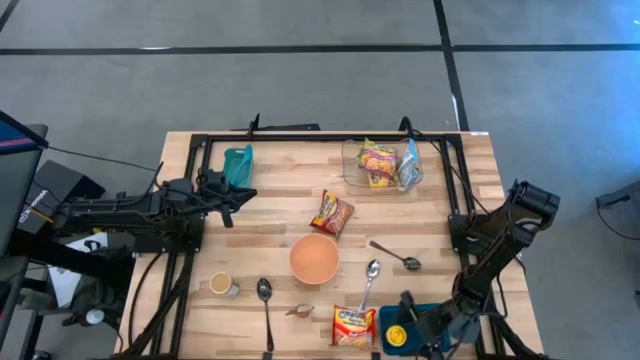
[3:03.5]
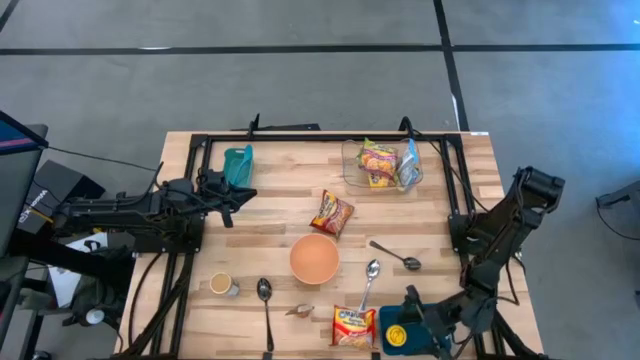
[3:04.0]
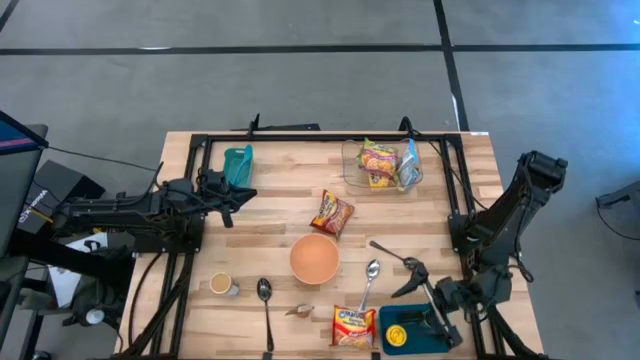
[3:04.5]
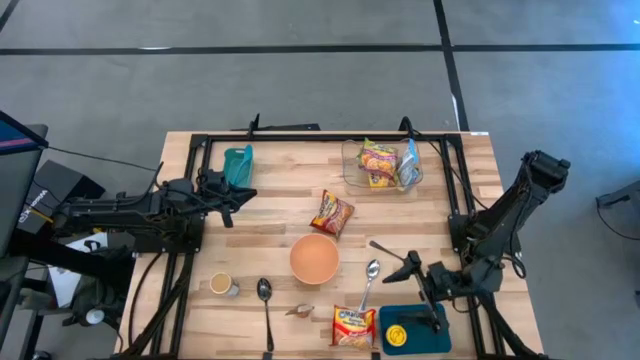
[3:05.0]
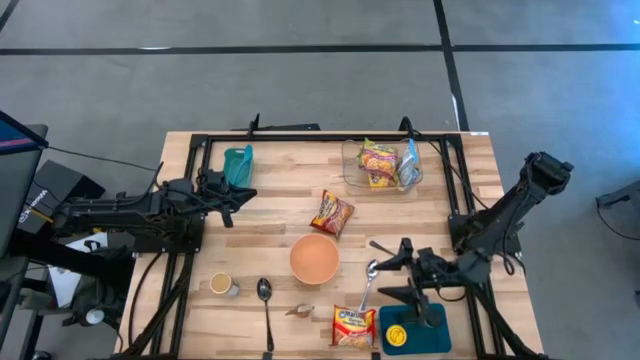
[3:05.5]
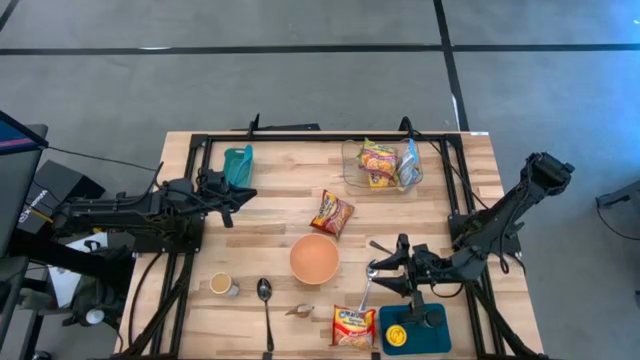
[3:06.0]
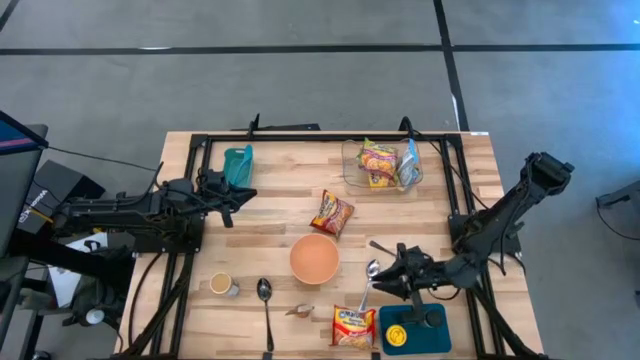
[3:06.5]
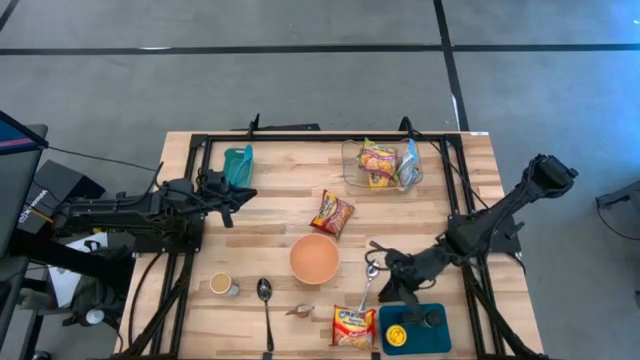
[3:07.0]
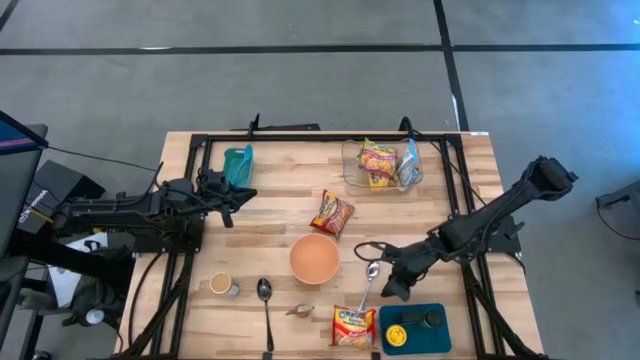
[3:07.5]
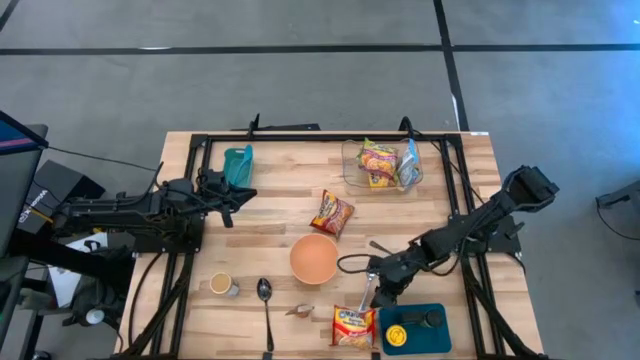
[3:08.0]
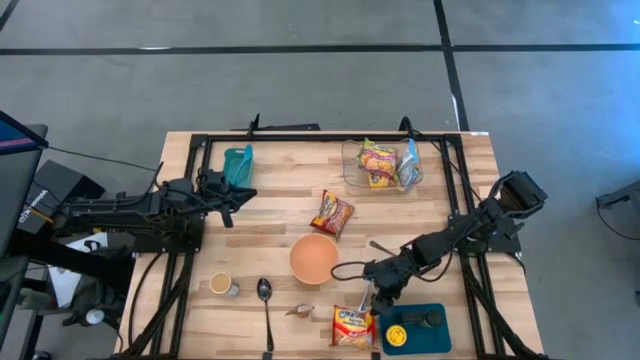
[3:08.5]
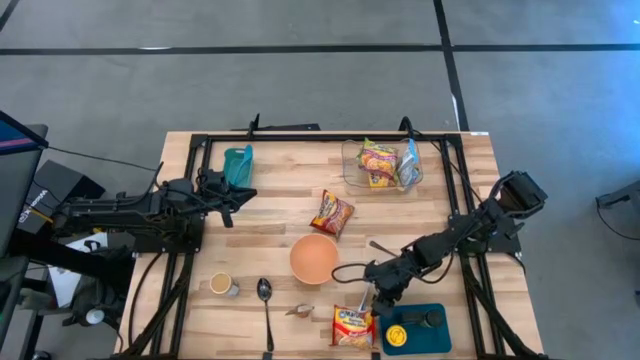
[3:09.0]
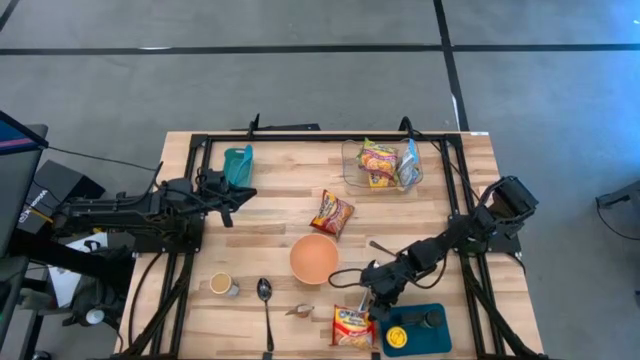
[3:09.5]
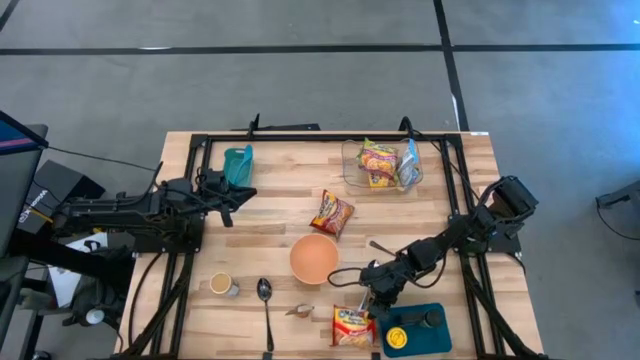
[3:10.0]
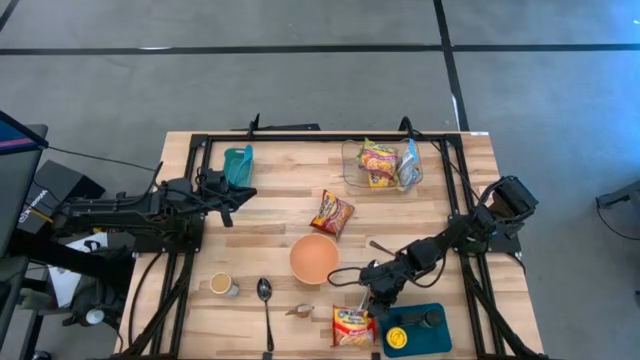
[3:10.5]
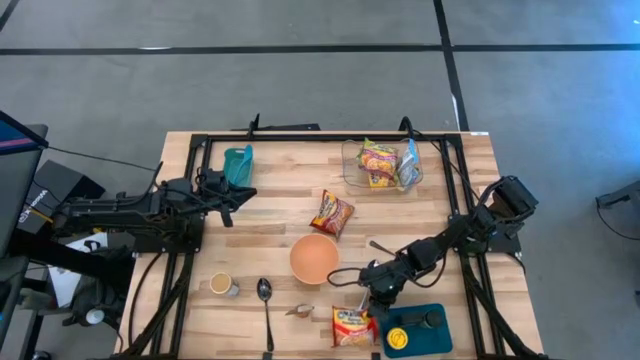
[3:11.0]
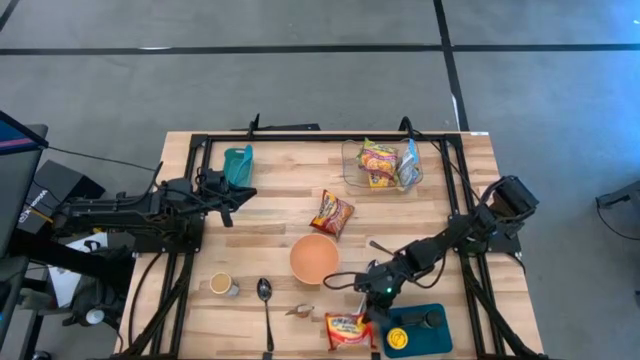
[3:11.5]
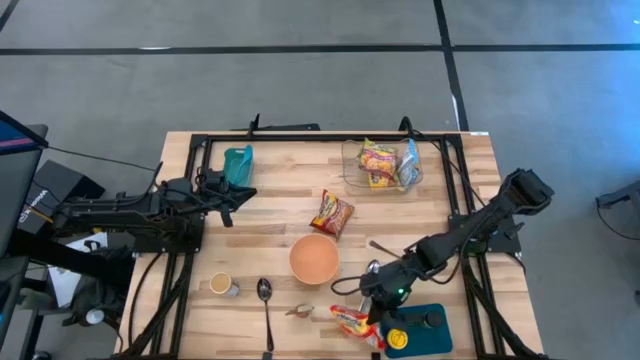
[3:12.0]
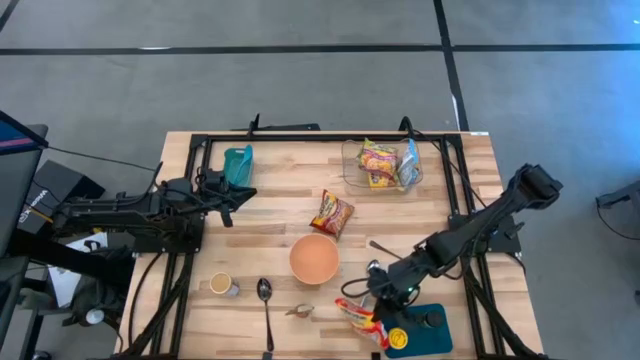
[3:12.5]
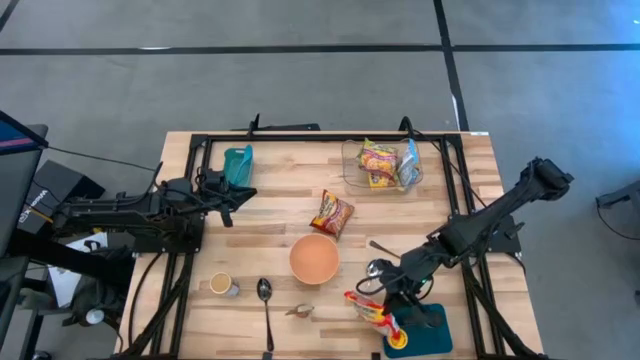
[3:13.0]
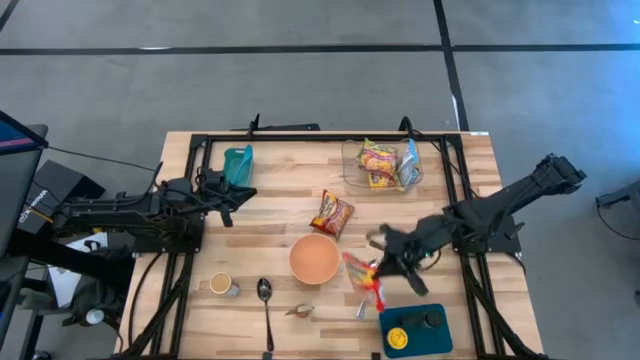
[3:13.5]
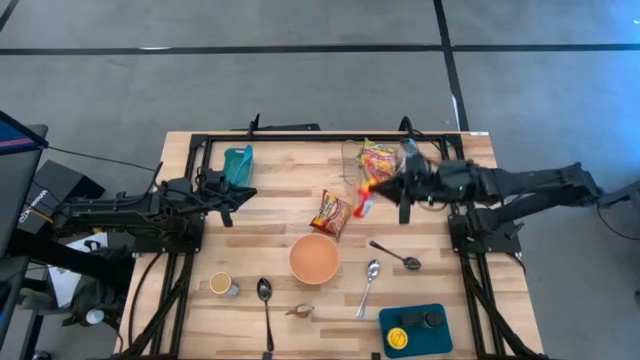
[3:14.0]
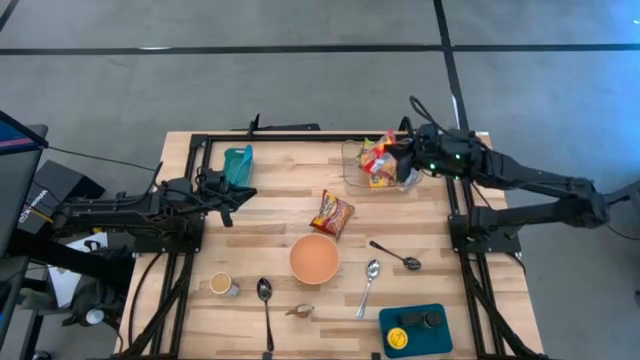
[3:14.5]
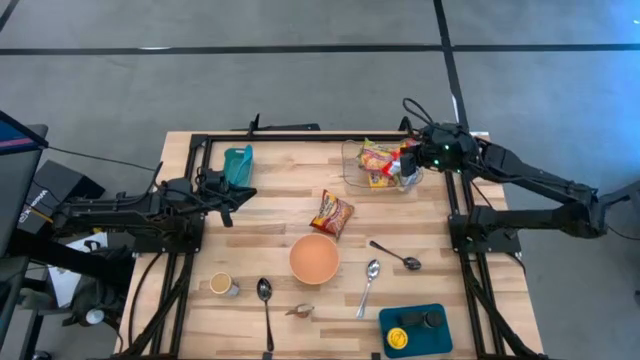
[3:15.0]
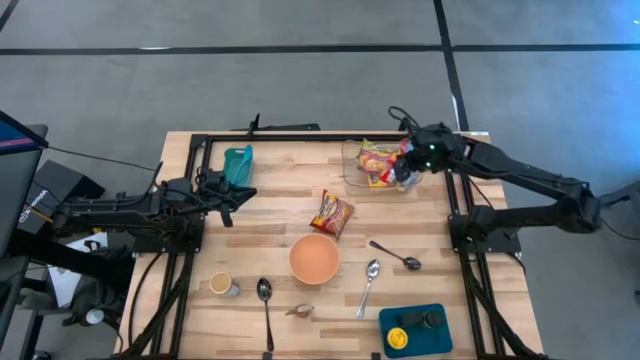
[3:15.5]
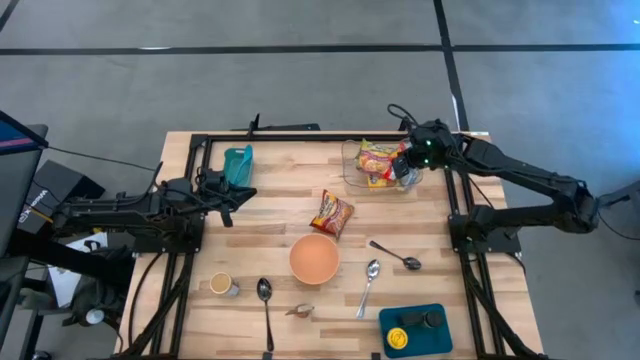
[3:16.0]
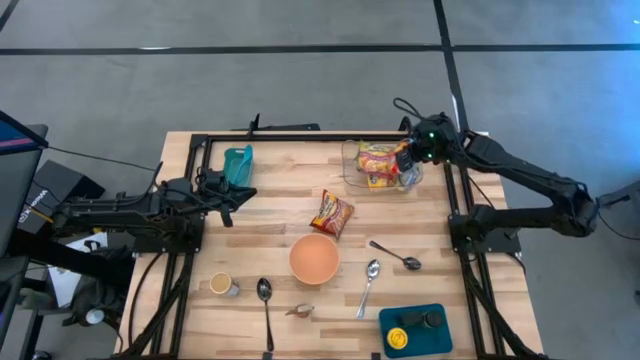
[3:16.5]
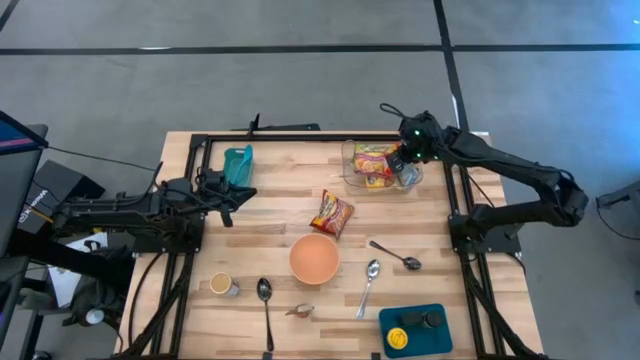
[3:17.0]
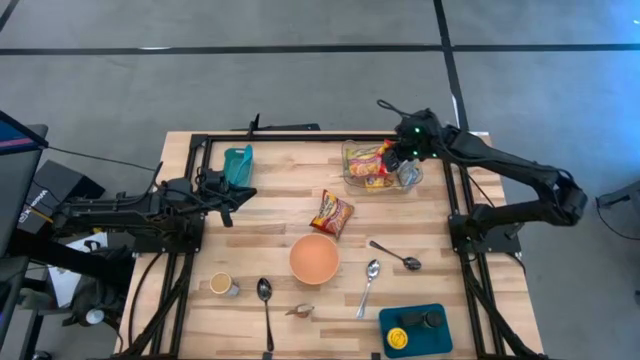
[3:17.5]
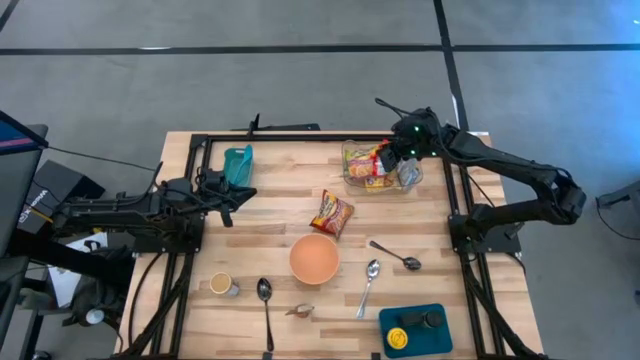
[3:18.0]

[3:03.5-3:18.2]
Task: Pick & Place Food Item
Put the orange noodle pack into the transparent bin

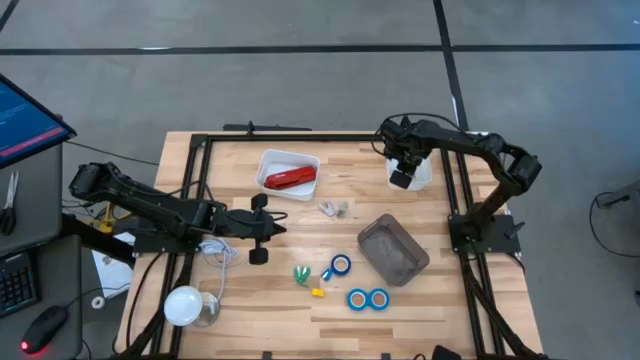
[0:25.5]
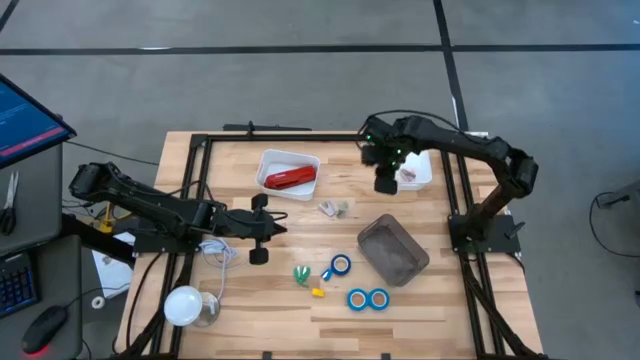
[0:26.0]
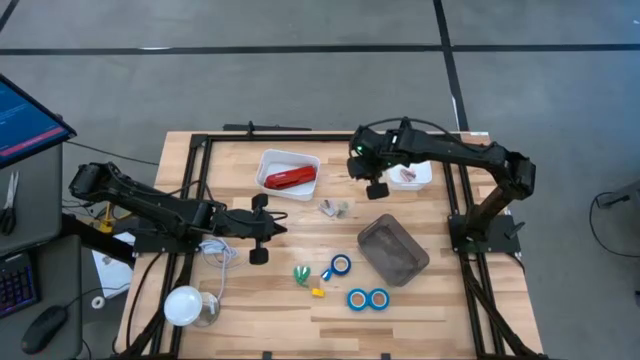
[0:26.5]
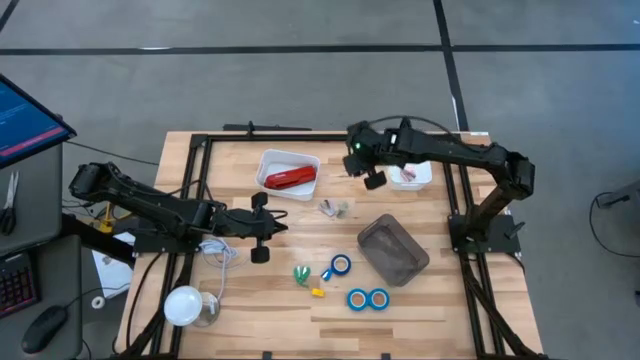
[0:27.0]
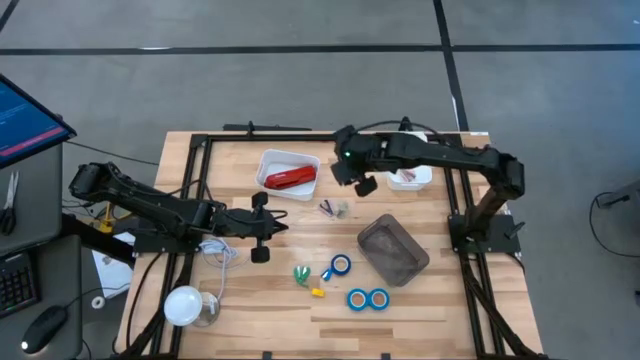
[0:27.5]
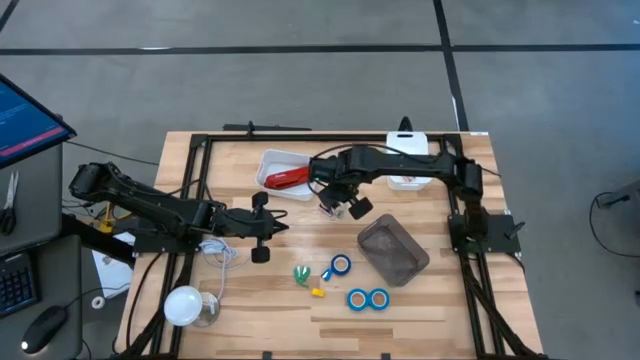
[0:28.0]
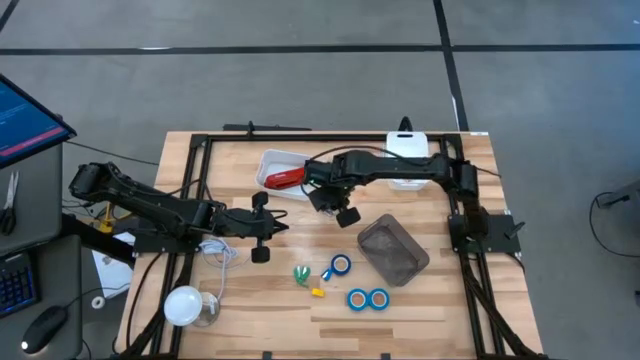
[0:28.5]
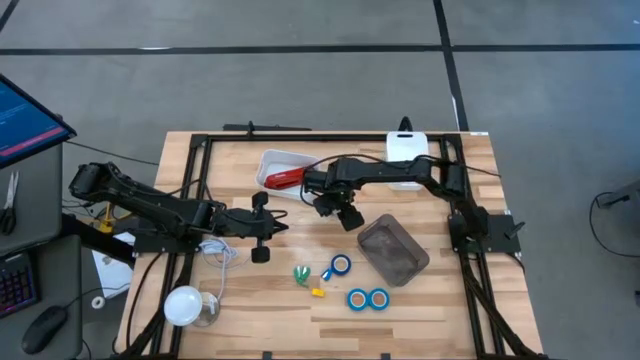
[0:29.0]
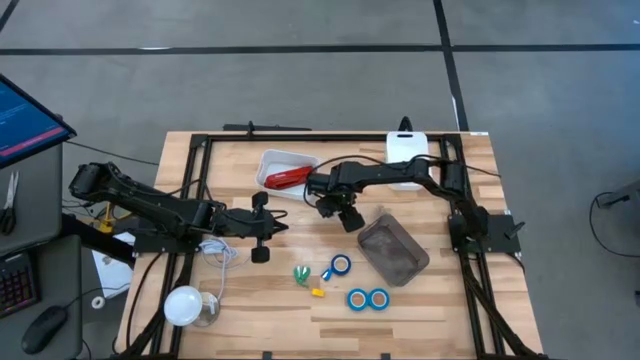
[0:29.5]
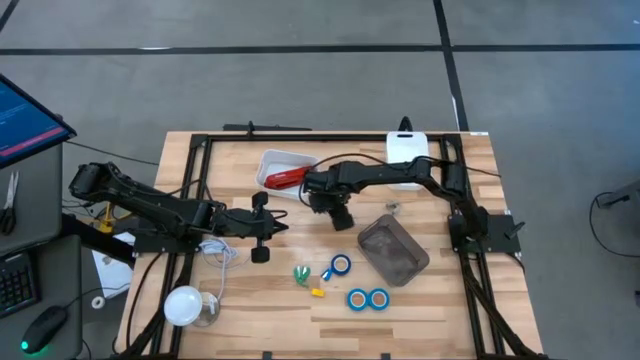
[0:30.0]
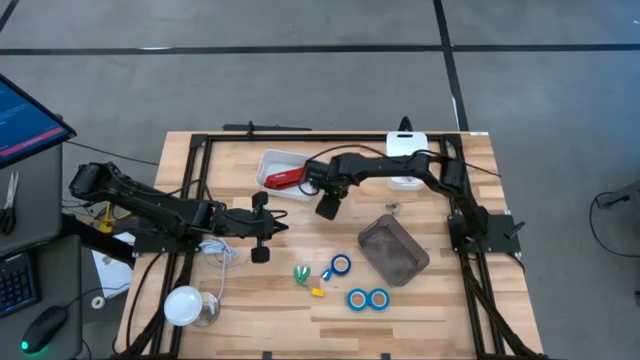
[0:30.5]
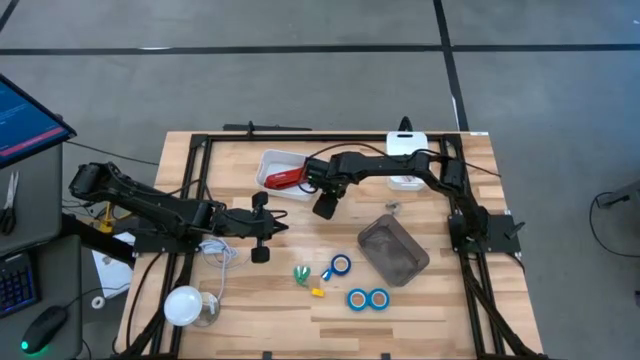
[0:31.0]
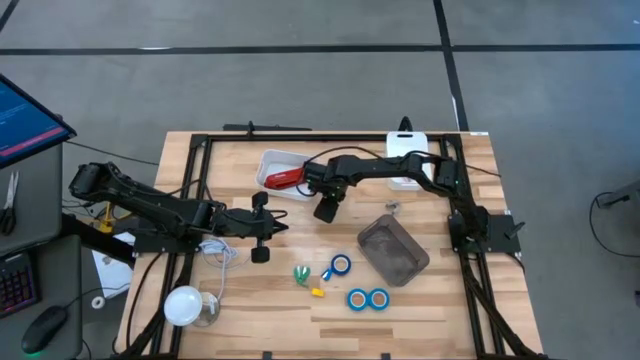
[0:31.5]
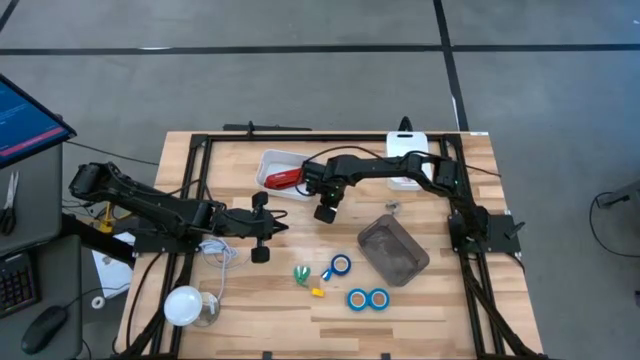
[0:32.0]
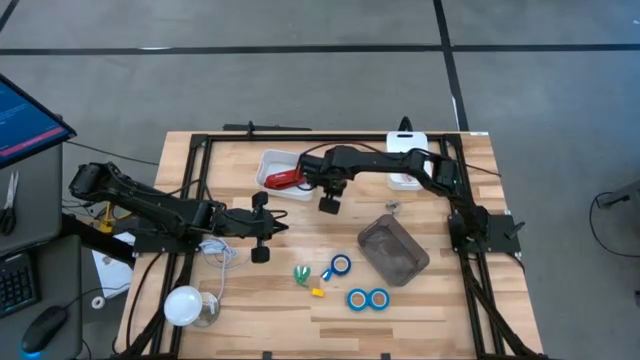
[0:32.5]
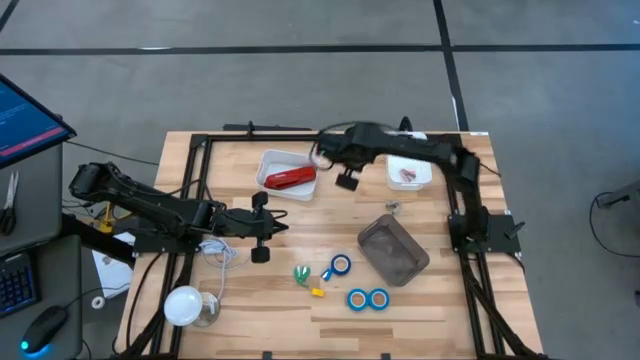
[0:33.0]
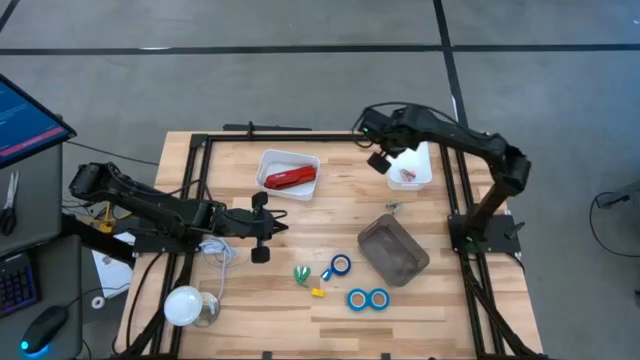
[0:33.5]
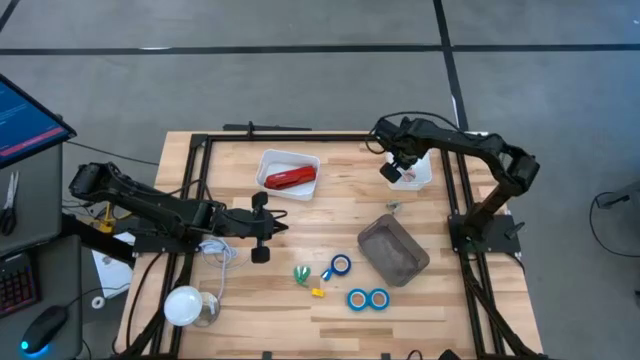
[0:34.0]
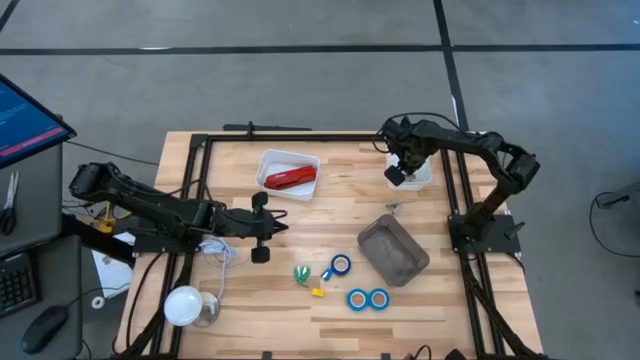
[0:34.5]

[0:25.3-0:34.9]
Task: Pick and place Stapler, Stapler remover, tape
Put the purple staple remover into the right white bin
